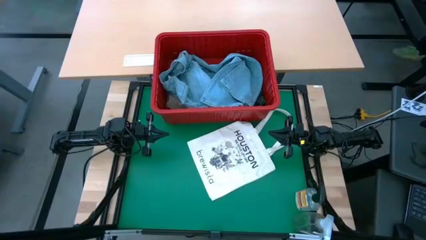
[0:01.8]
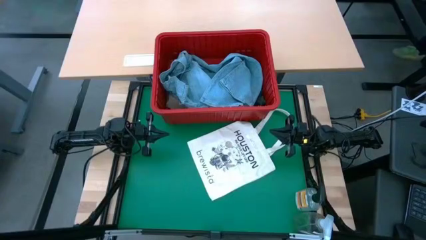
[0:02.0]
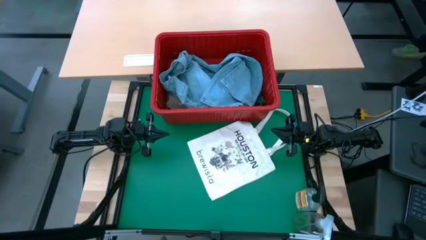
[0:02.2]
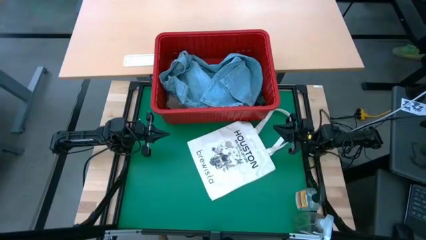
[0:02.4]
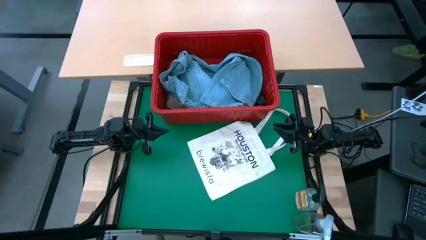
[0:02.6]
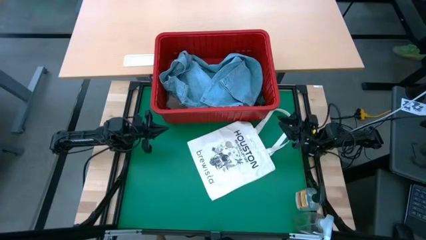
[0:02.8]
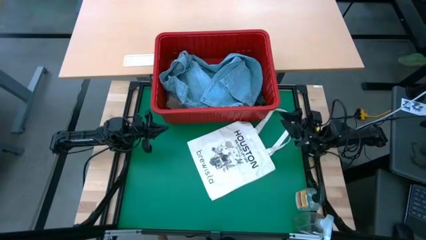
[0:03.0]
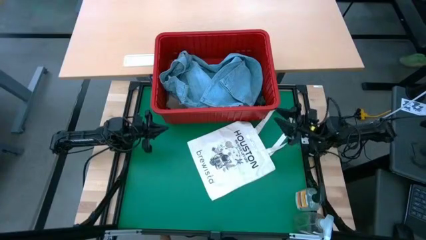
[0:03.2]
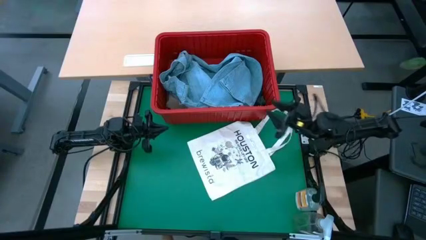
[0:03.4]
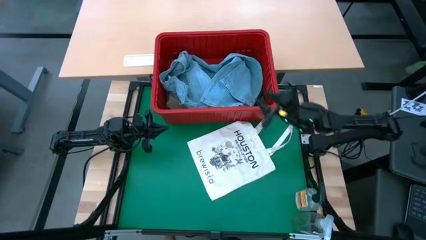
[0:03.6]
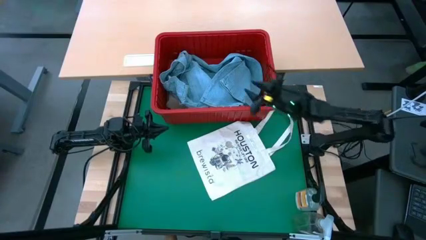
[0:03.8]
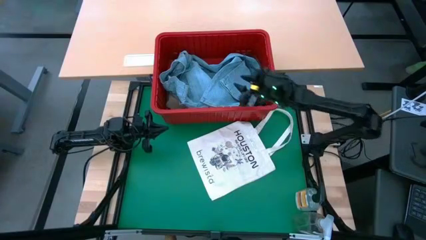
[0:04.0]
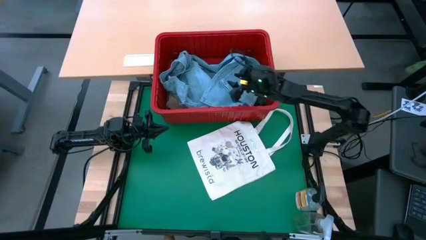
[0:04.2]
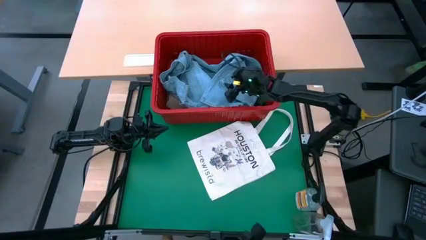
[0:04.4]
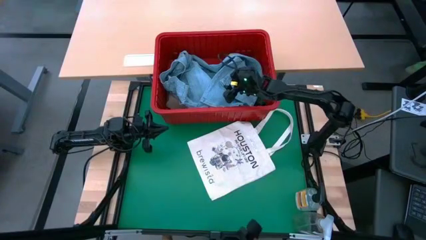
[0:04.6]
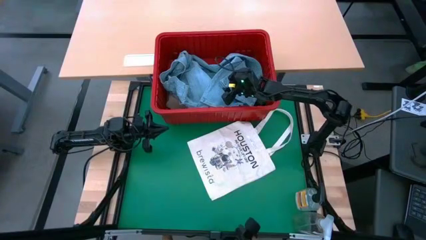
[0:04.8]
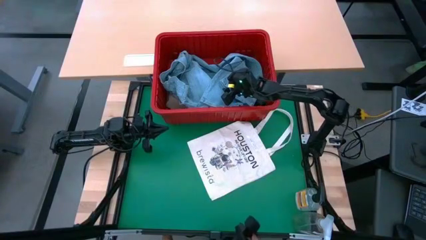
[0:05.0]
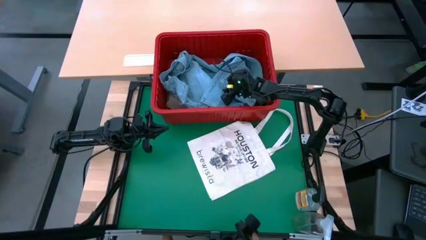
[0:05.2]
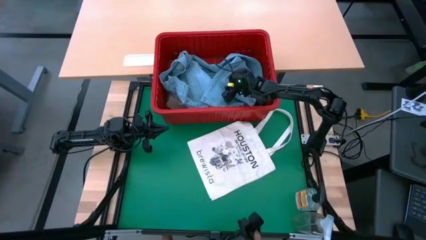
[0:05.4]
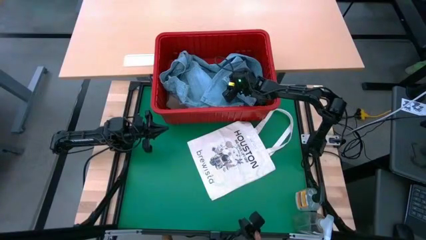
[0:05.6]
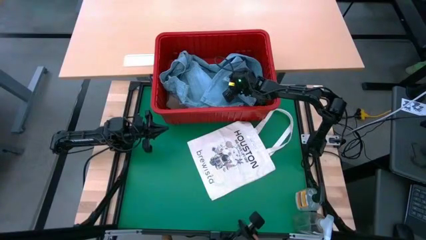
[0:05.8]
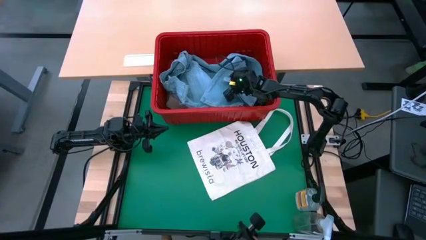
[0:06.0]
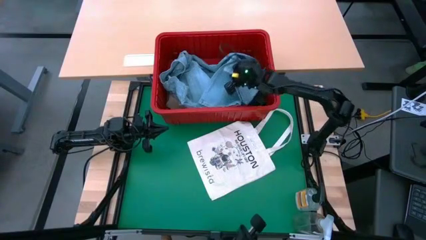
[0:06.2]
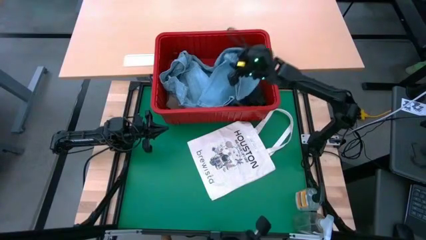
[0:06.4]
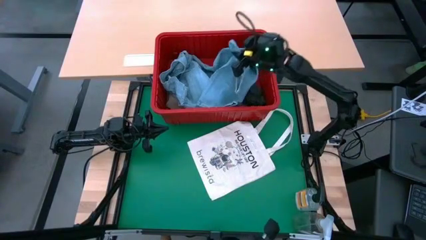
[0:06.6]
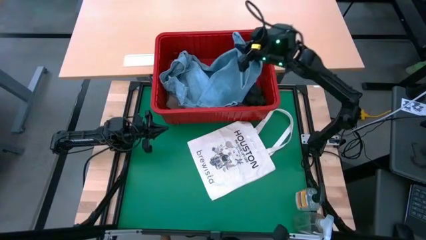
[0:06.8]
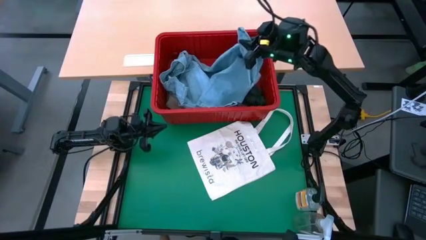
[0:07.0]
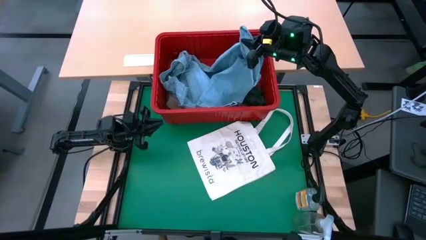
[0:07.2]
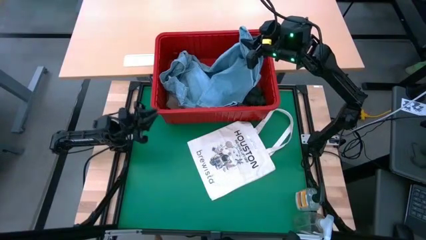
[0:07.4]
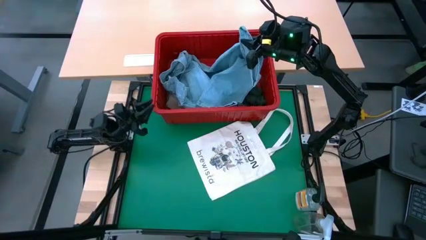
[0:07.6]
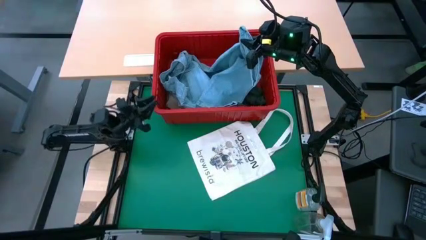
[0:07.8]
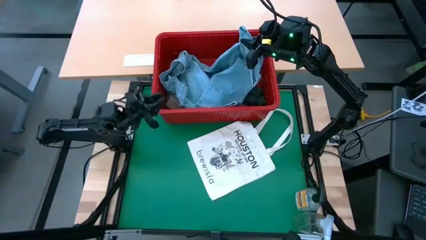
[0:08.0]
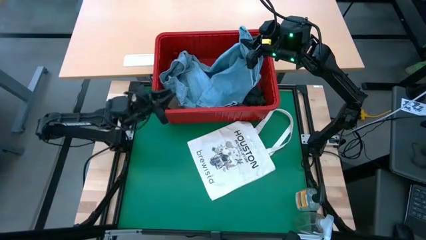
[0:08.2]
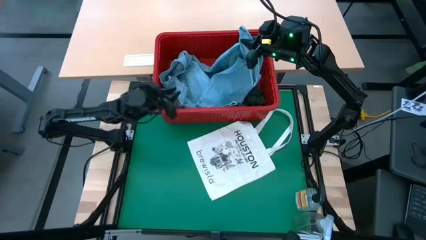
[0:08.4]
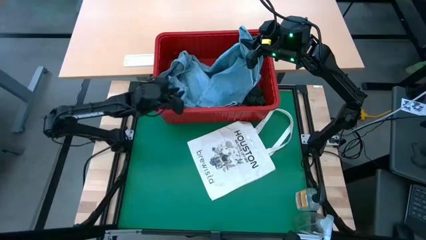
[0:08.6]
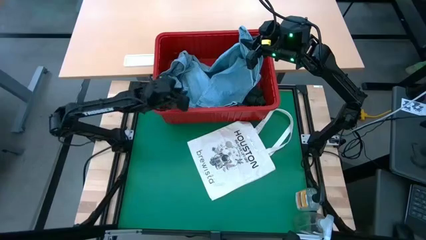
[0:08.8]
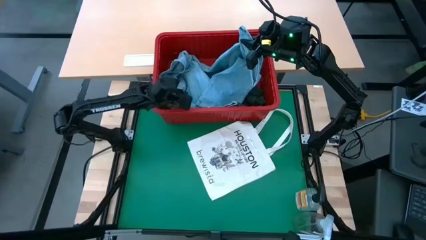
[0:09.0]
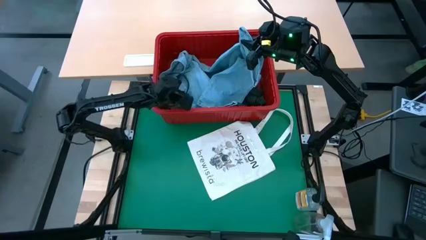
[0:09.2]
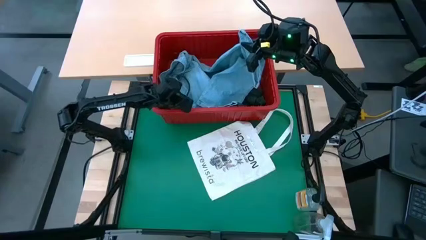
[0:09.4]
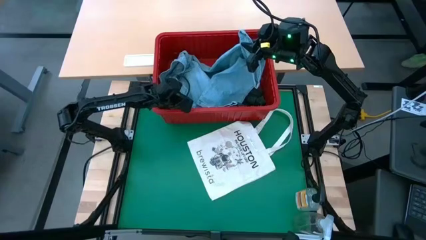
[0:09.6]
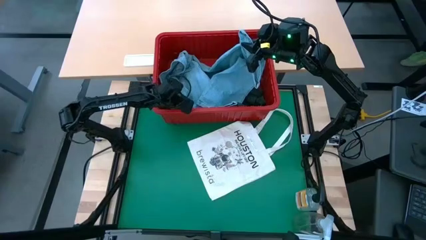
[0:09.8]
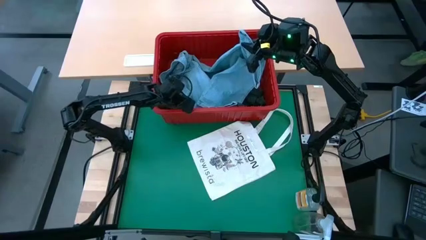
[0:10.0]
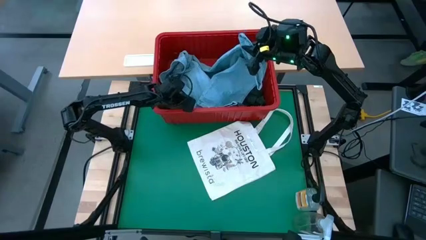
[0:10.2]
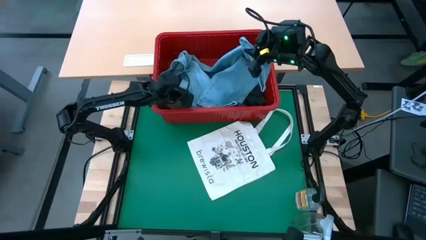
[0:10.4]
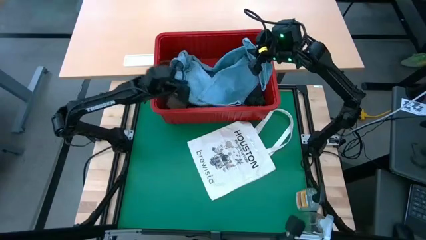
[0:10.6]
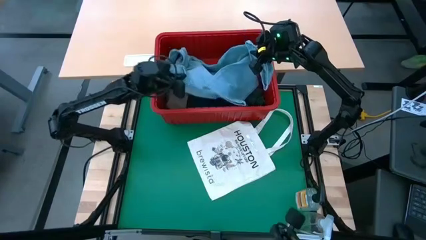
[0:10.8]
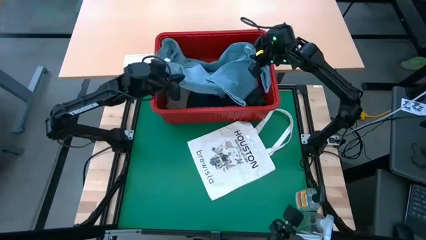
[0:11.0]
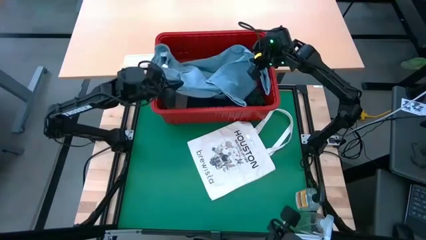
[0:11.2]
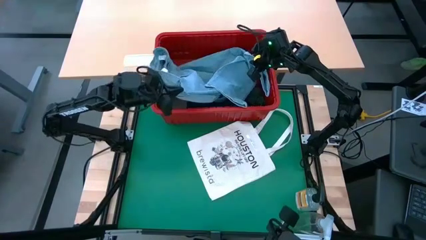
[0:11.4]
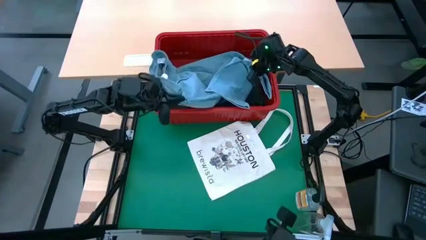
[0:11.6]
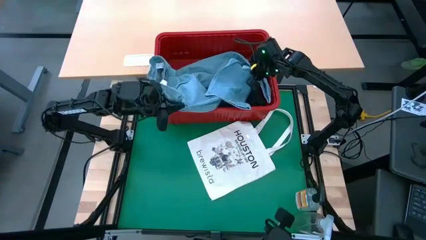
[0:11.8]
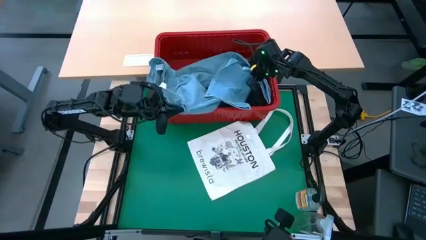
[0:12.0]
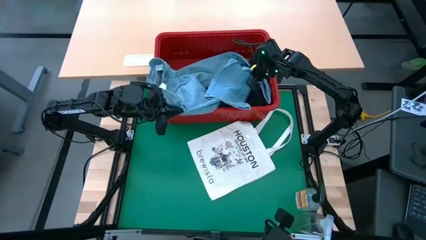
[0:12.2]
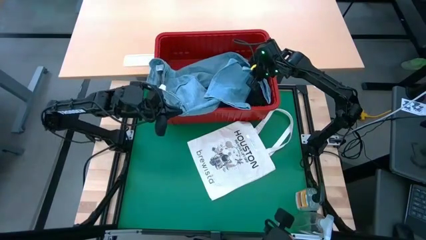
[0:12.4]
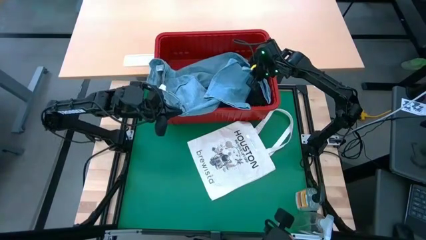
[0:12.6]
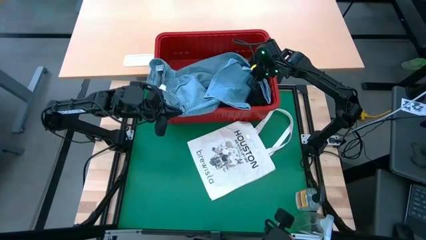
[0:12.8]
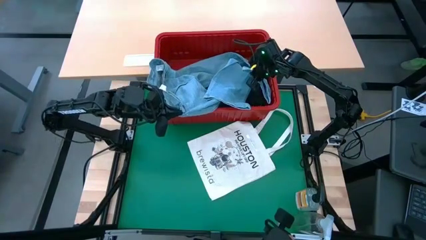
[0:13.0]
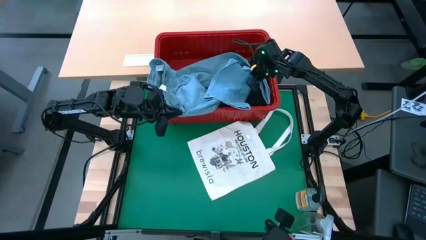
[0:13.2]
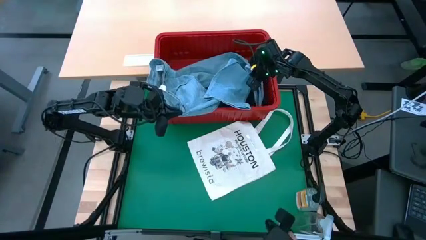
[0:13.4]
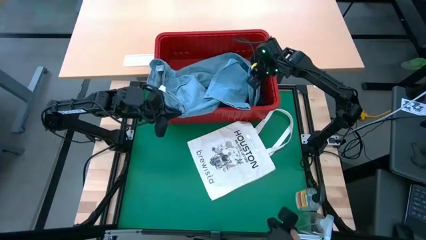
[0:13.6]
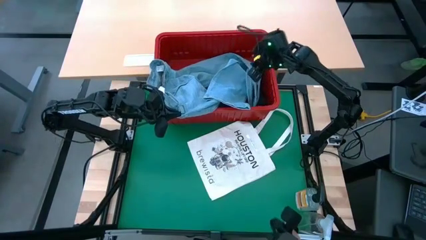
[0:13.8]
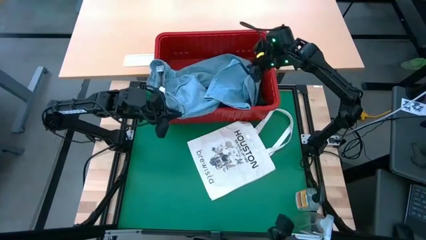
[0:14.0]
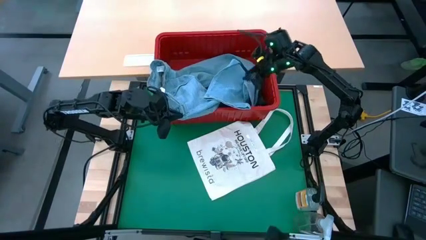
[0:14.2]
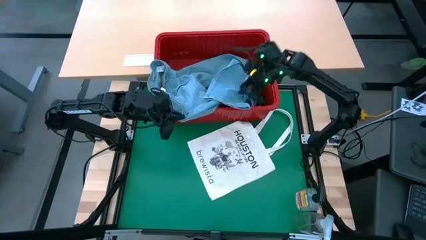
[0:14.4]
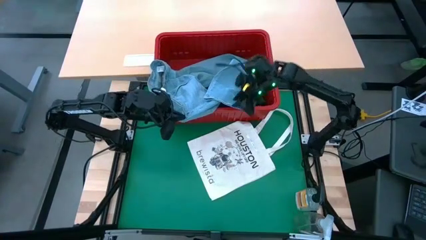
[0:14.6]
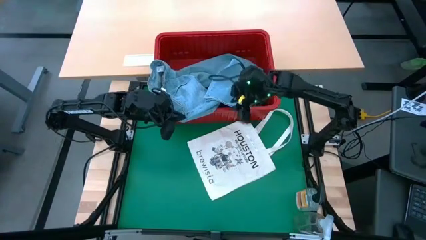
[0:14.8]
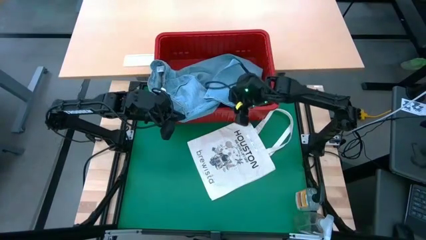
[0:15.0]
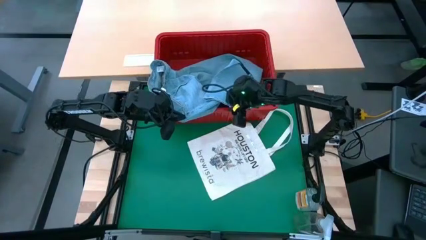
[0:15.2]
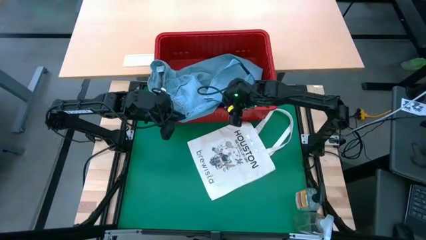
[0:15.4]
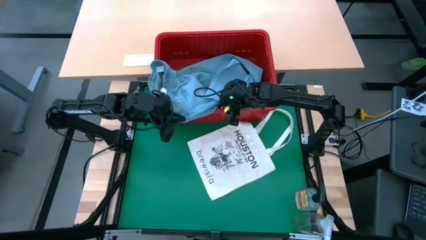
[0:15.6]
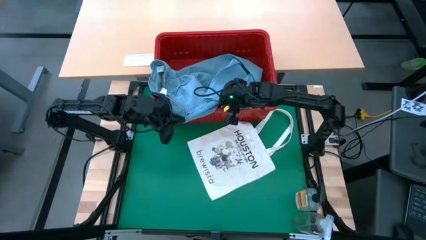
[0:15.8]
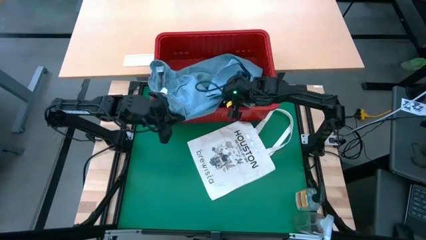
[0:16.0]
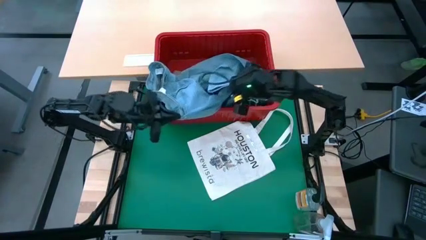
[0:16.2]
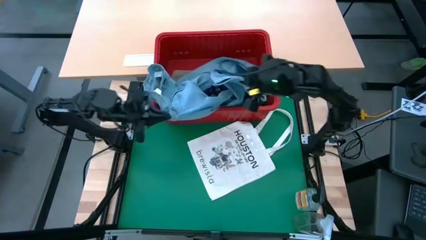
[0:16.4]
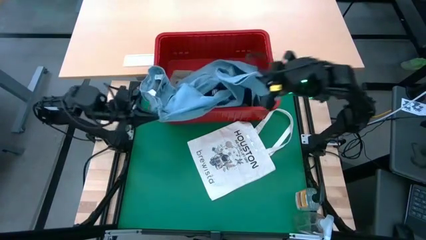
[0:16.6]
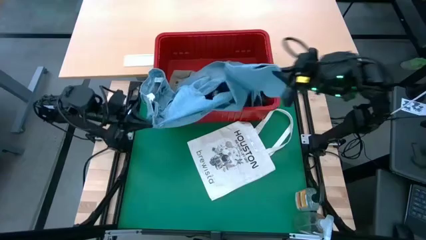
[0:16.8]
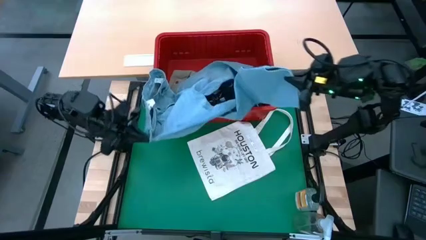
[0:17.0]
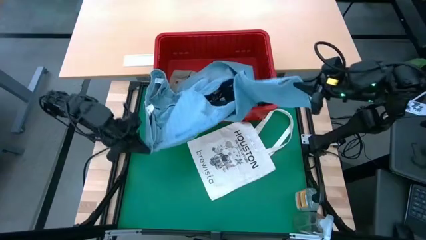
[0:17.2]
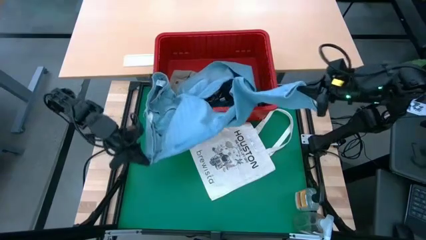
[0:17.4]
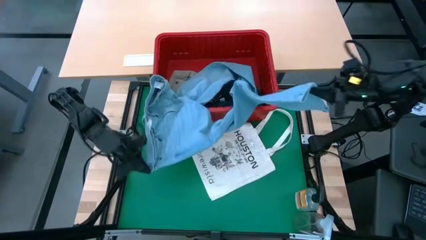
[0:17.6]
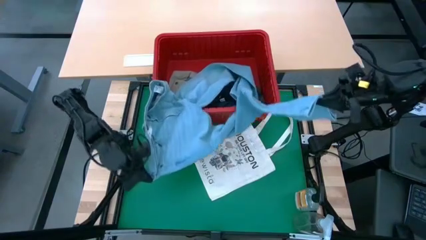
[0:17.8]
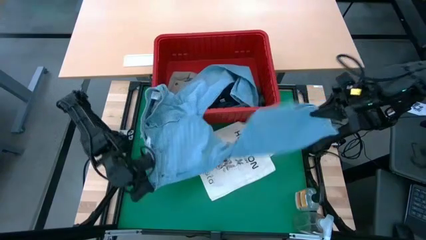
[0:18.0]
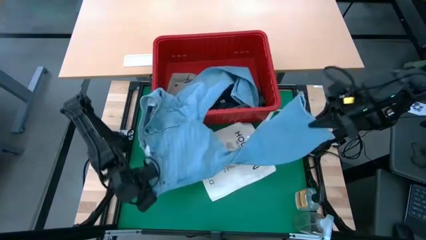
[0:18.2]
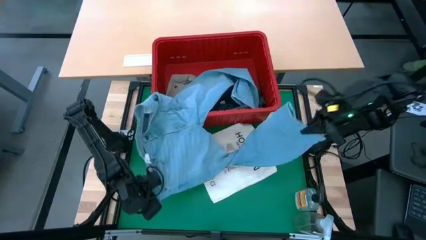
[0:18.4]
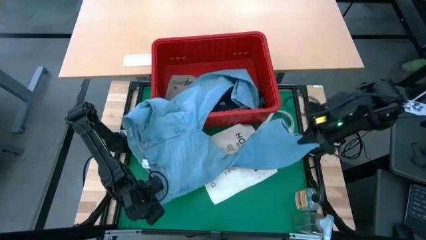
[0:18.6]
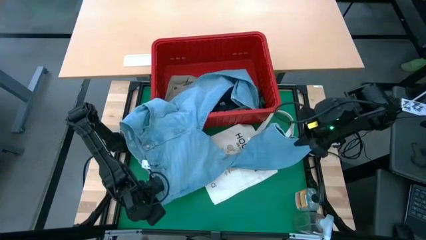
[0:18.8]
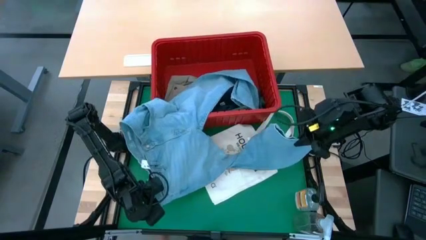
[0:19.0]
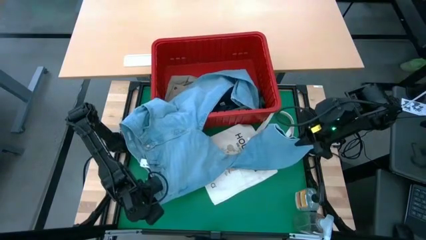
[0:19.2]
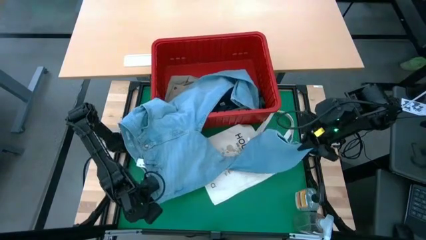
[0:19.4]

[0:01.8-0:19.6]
Task: Fold Laundry from Bin
Fold the blue jeans
